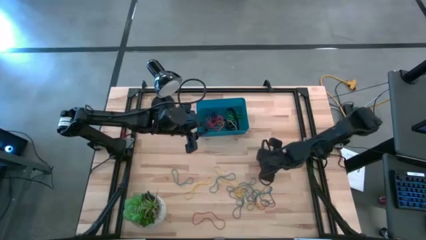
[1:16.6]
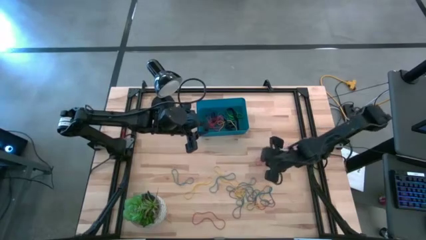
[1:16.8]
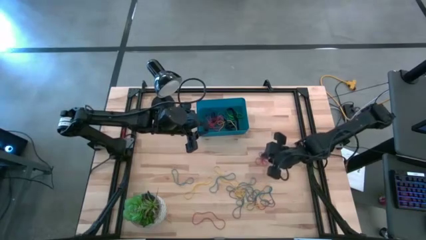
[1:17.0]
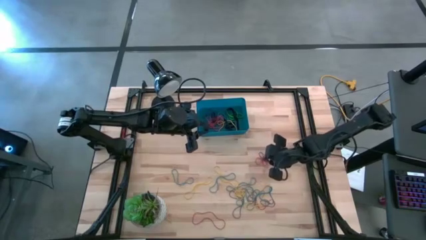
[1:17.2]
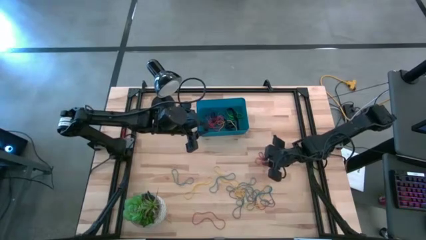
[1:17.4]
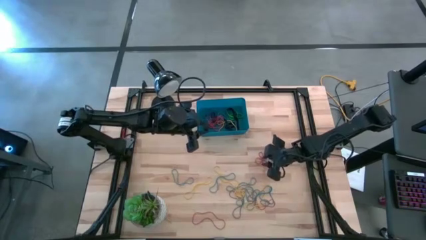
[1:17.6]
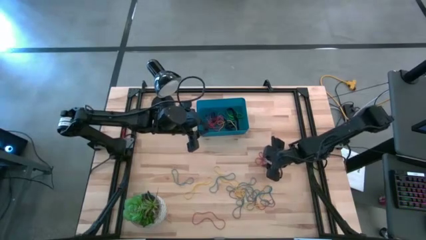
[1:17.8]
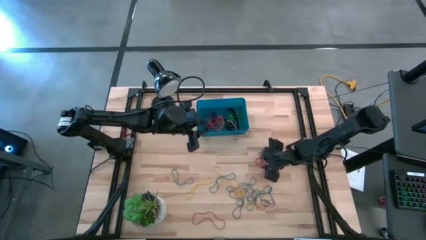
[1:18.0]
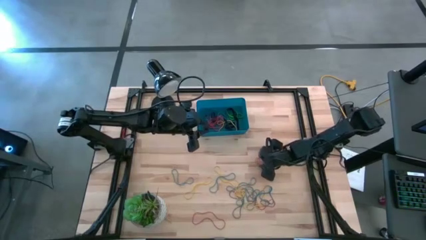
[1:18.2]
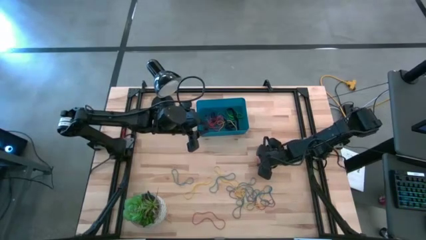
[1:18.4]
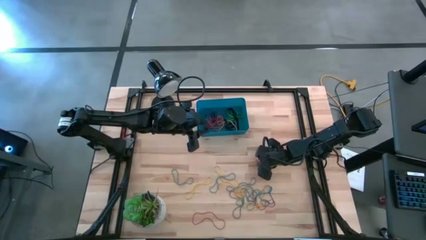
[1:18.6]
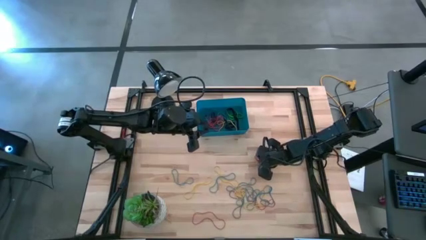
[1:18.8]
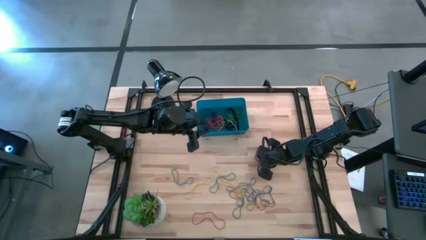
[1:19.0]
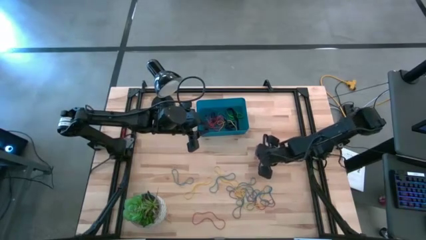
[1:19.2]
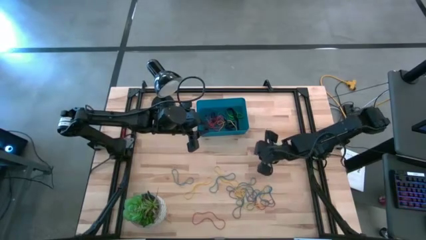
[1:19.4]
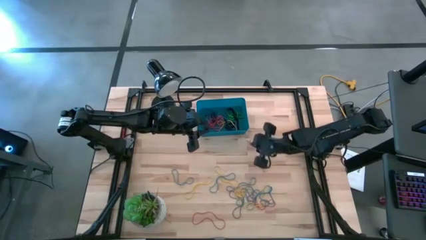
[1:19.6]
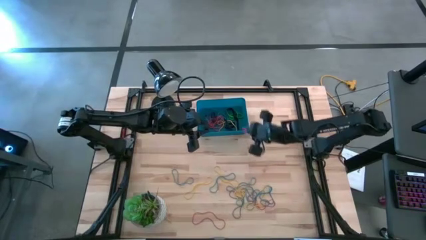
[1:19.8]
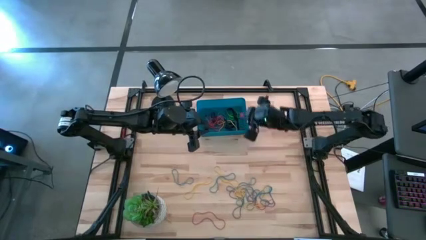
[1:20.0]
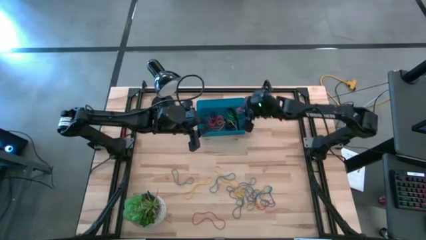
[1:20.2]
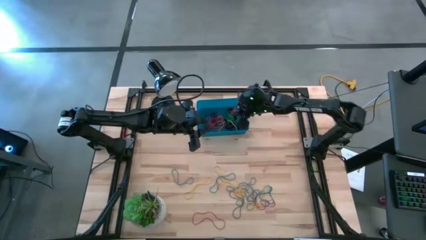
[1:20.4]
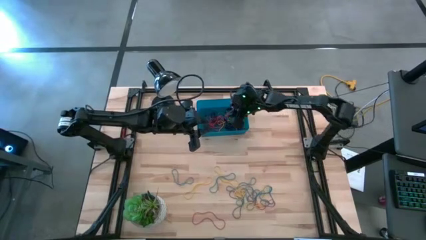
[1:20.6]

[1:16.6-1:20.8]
Task: Pick and place rubber bands into bin
Put the red rubber band into the blue bin

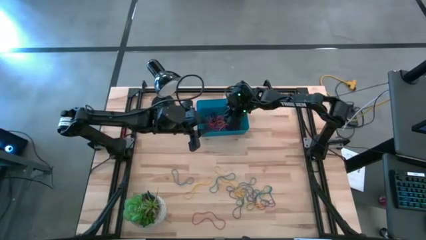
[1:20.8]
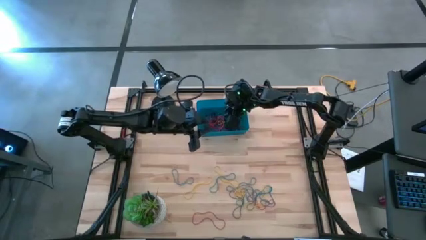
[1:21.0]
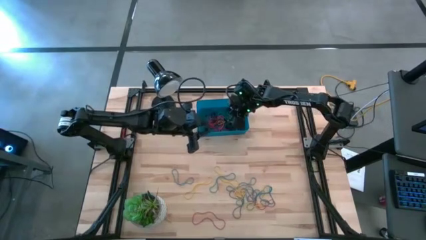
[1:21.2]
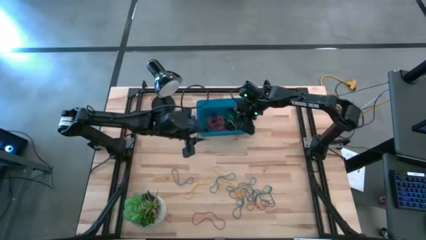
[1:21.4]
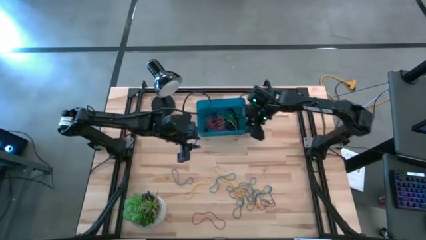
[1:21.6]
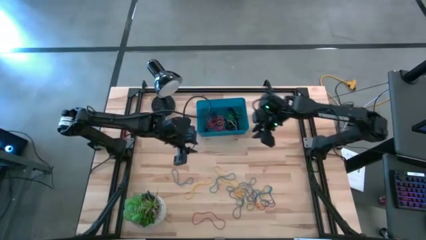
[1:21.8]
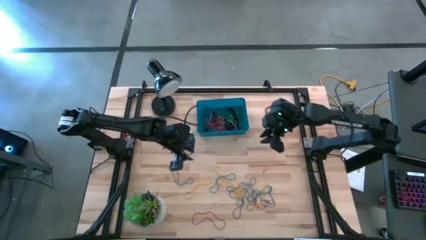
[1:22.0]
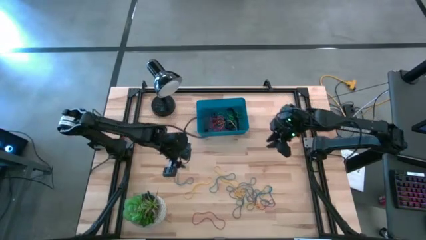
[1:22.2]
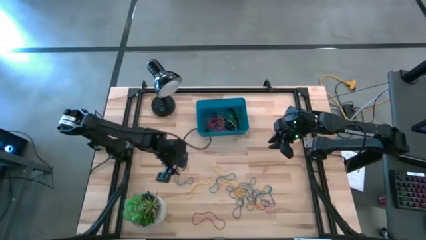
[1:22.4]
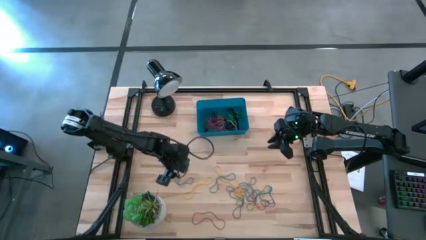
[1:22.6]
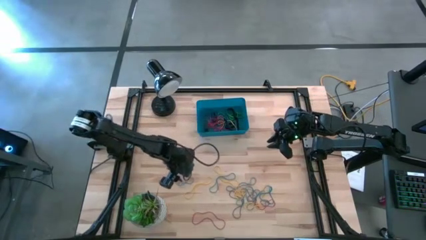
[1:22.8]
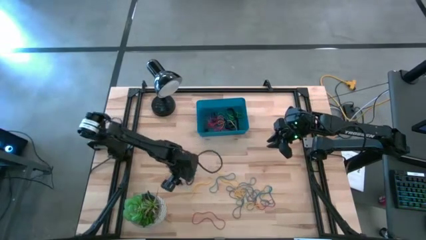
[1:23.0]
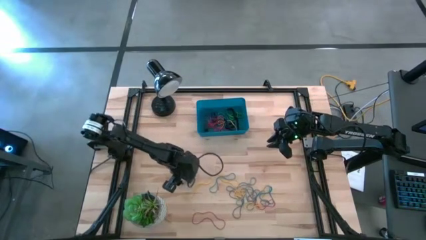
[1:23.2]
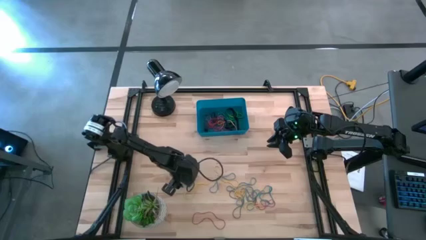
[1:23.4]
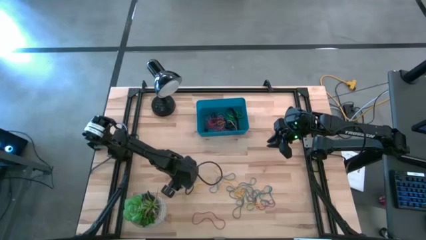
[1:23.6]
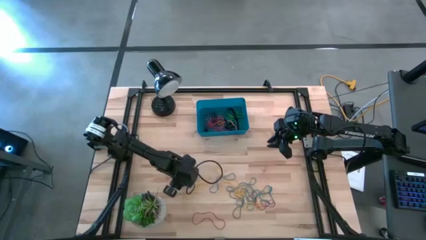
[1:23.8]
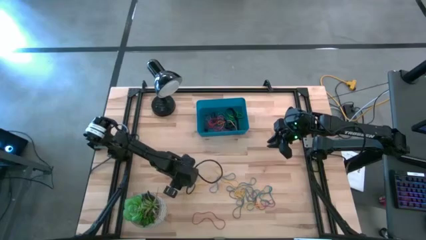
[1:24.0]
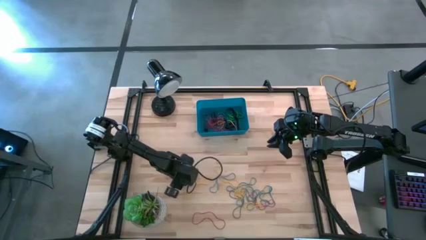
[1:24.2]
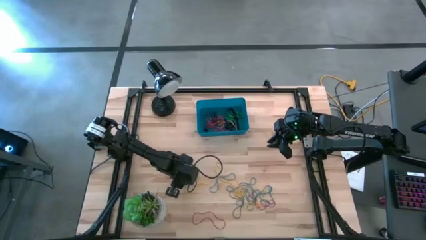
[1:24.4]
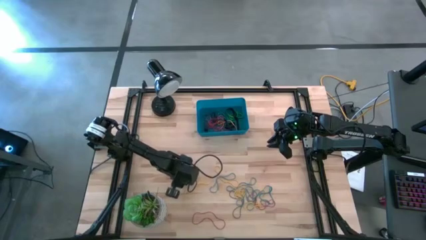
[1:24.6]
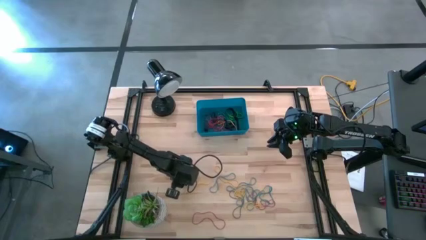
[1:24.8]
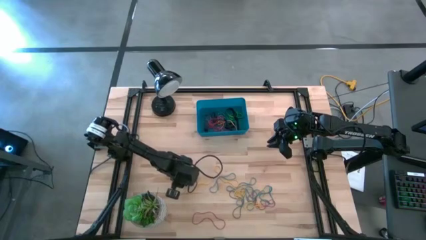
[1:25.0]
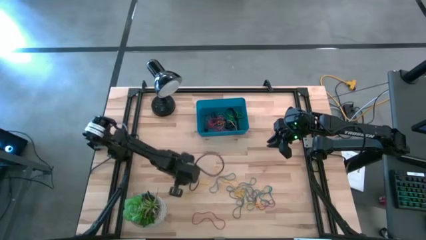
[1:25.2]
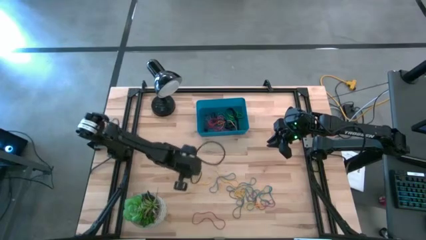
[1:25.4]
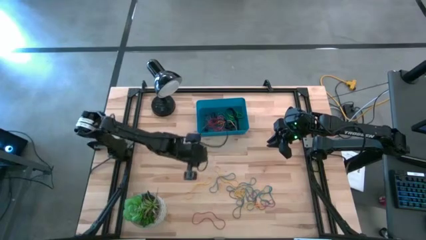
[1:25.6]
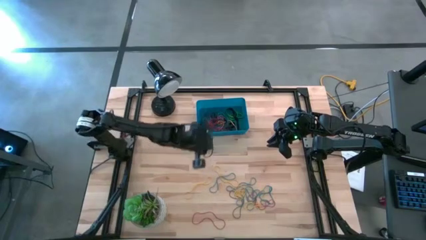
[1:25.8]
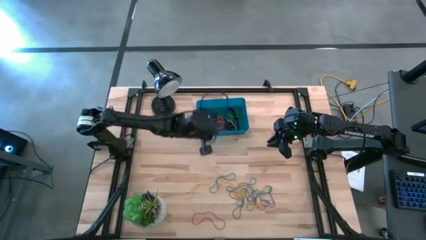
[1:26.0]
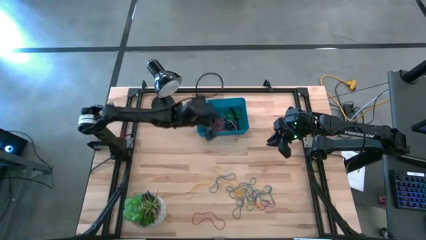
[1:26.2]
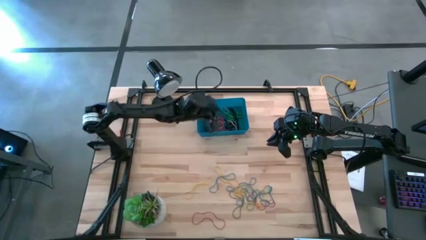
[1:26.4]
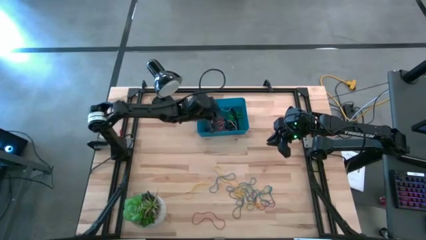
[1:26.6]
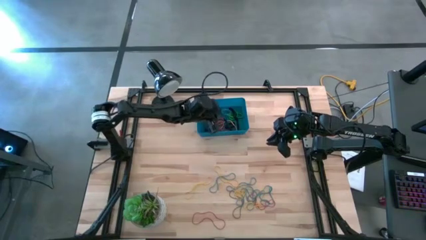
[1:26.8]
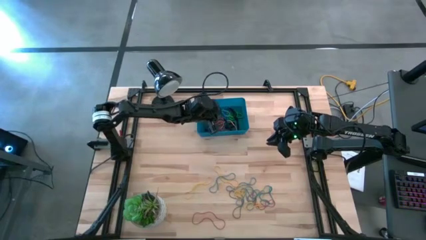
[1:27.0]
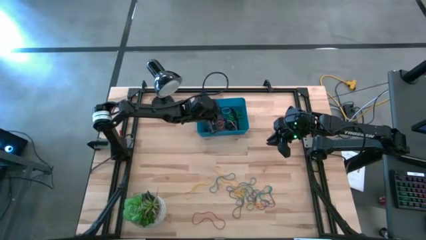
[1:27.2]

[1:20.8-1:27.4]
Put the blue rubber band into the blue bin

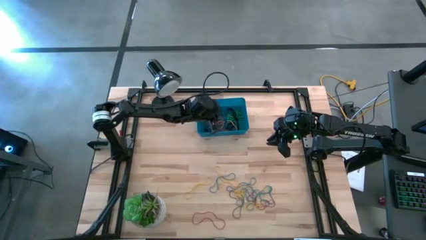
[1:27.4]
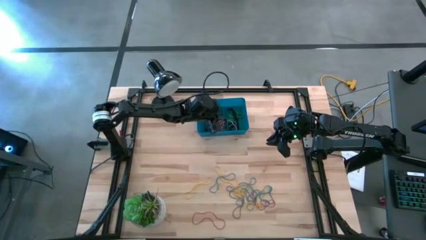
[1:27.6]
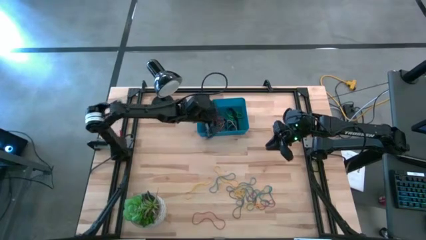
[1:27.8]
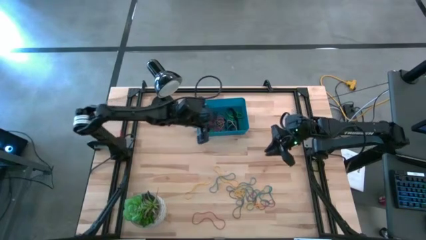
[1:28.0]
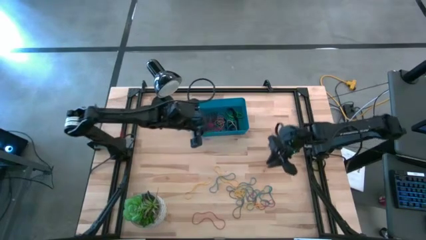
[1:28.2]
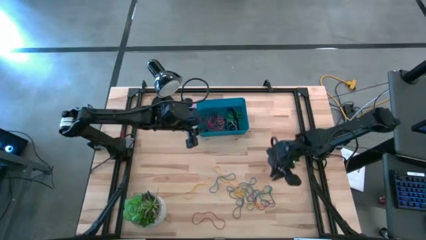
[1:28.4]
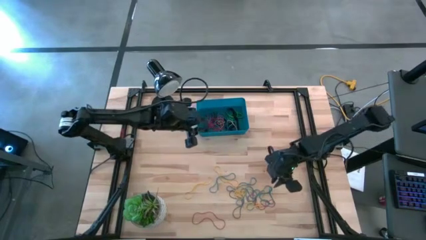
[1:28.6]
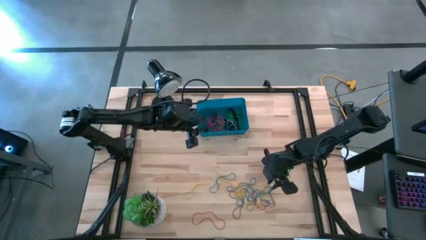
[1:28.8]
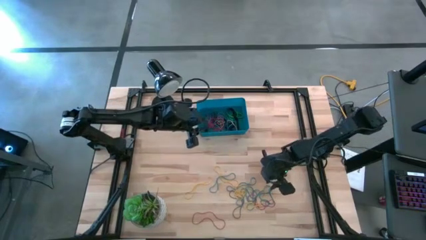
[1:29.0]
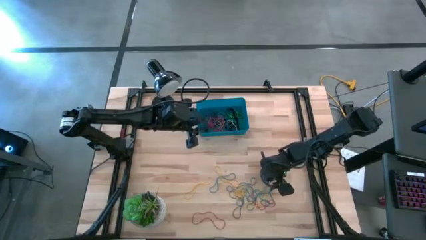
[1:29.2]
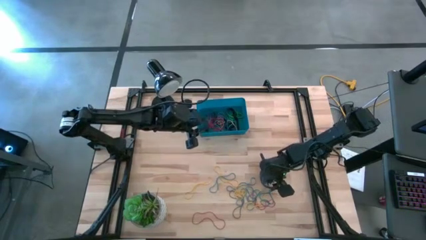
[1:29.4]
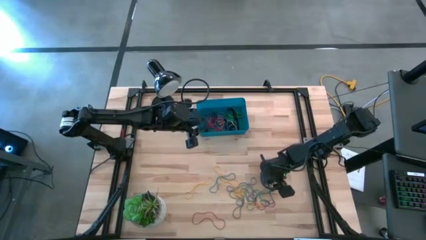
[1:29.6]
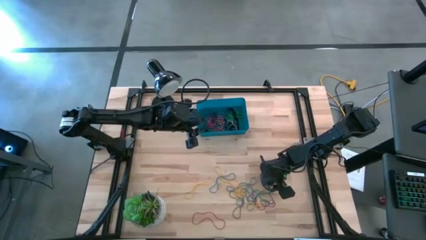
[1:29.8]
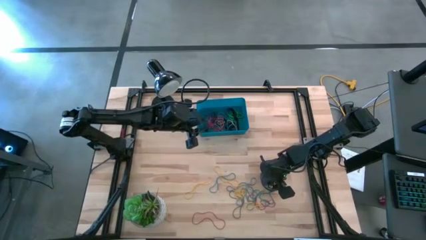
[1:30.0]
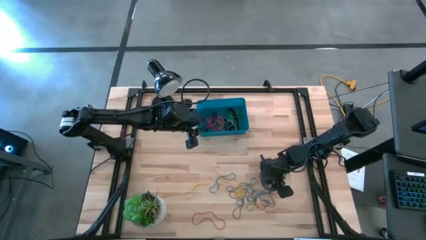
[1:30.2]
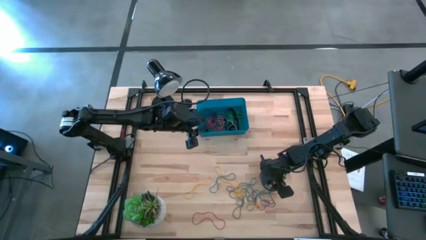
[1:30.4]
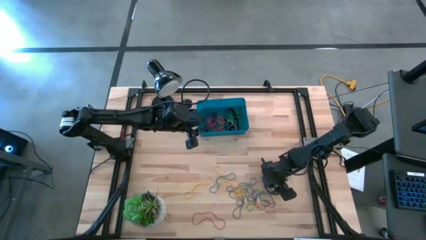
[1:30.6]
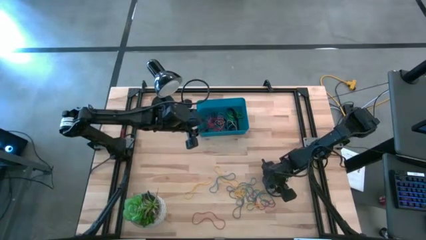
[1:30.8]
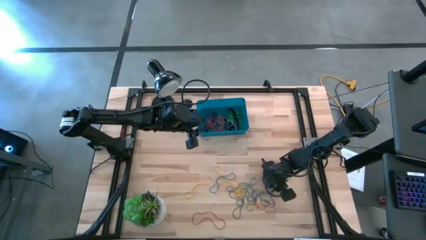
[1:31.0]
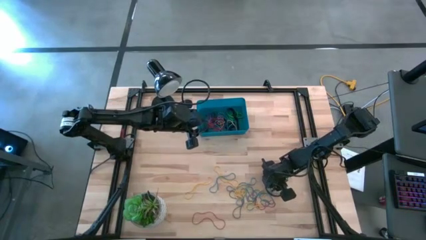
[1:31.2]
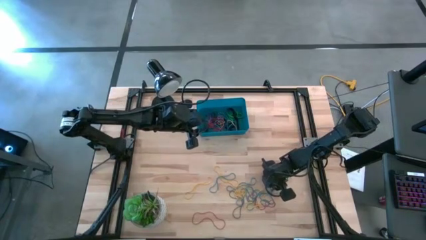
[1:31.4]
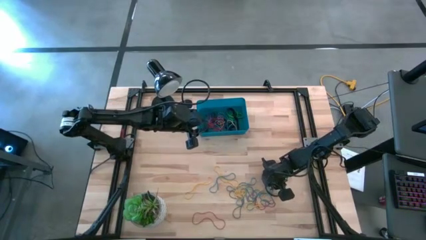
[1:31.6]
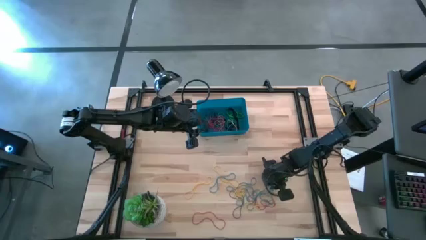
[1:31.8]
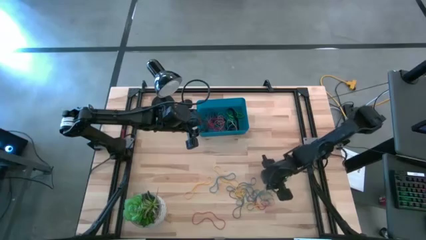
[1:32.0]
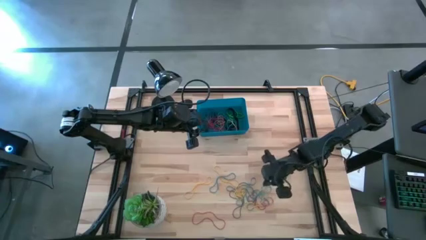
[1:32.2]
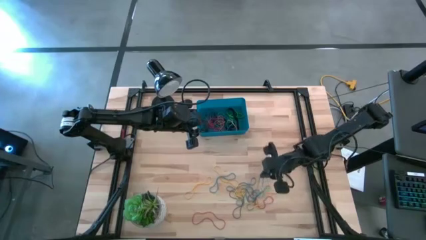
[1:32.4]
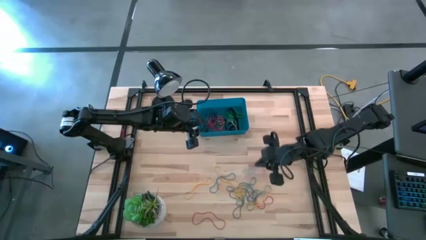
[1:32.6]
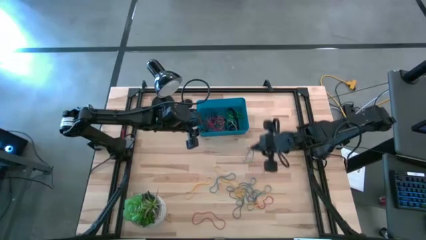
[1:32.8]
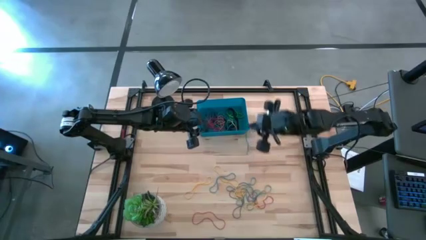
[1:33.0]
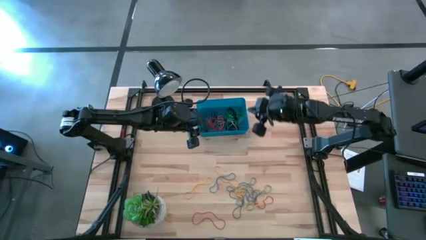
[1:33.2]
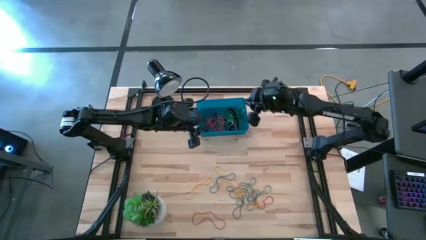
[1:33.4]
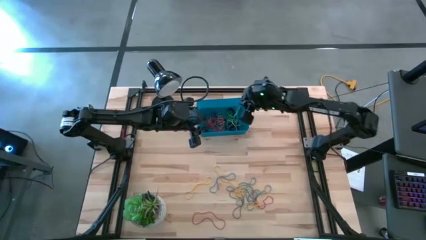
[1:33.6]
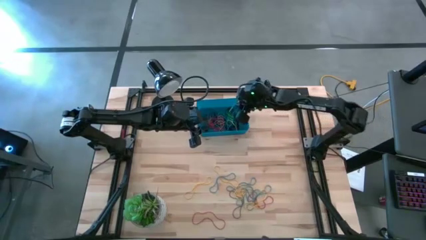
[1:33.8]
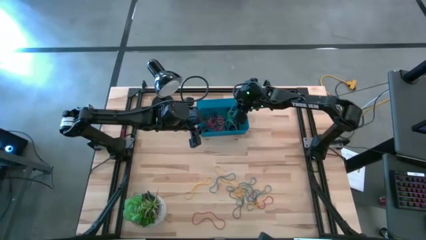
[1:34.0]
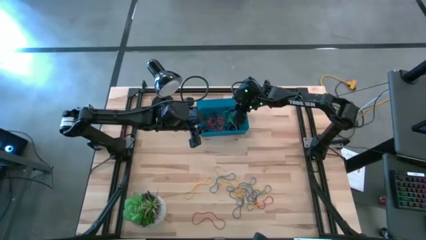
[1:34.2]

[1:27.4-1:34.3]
Put the blue rubber band into the blue bin
